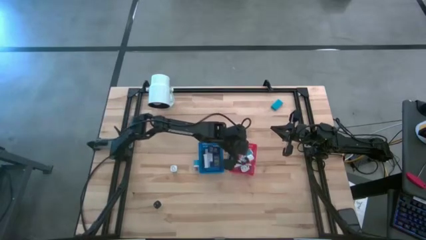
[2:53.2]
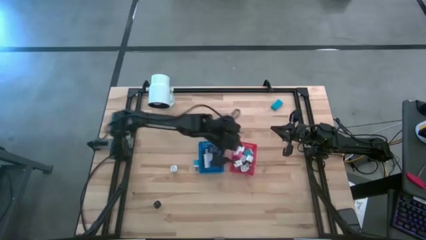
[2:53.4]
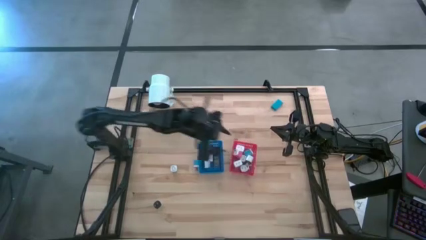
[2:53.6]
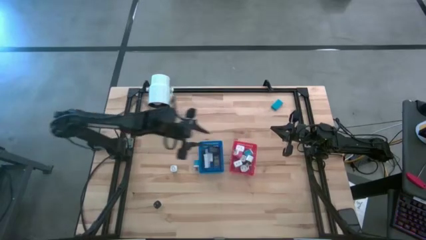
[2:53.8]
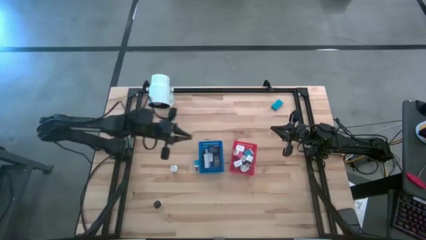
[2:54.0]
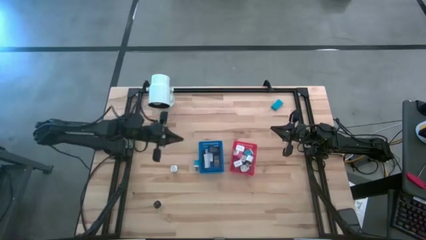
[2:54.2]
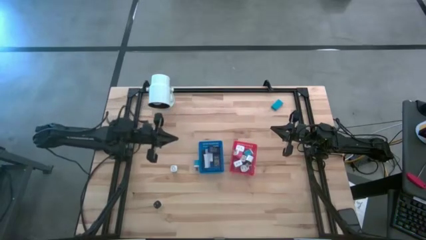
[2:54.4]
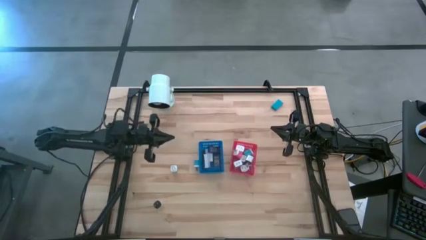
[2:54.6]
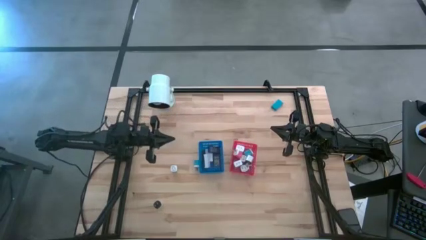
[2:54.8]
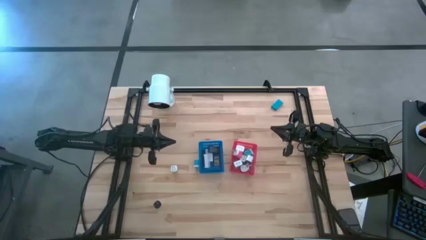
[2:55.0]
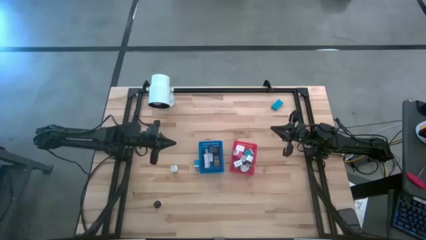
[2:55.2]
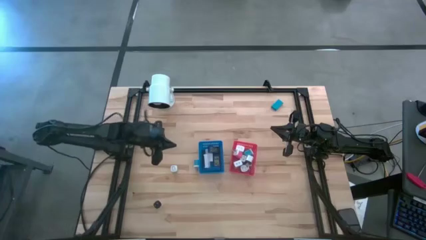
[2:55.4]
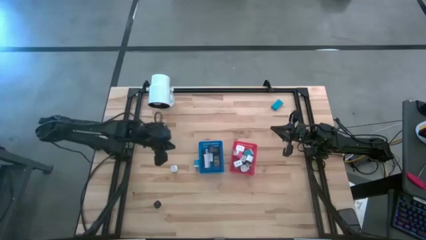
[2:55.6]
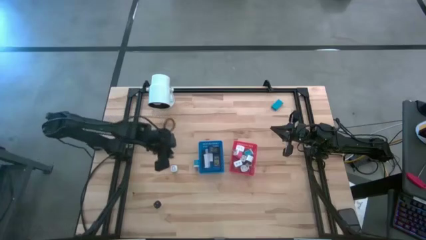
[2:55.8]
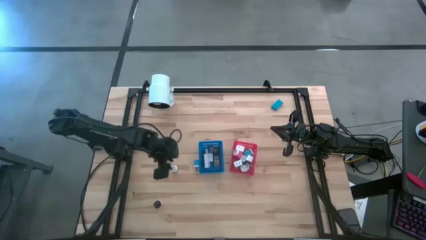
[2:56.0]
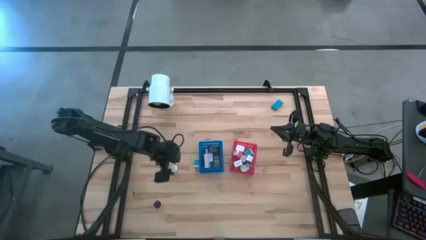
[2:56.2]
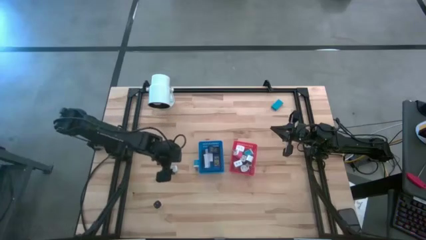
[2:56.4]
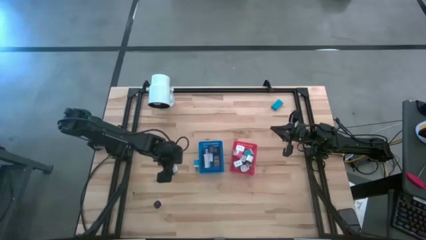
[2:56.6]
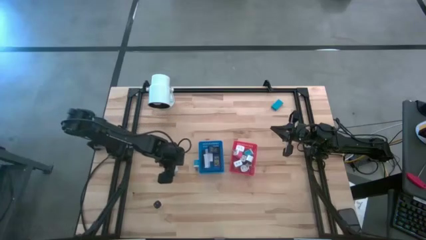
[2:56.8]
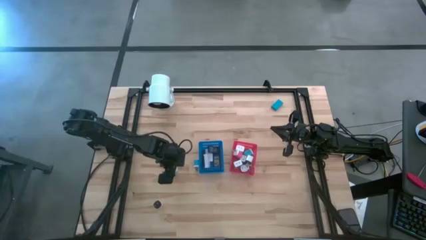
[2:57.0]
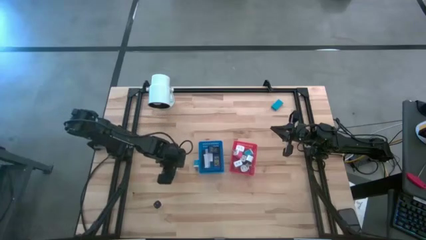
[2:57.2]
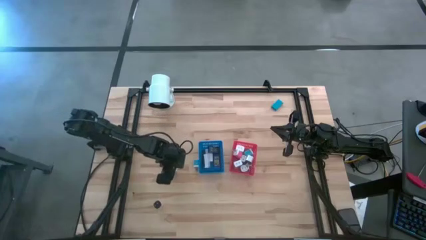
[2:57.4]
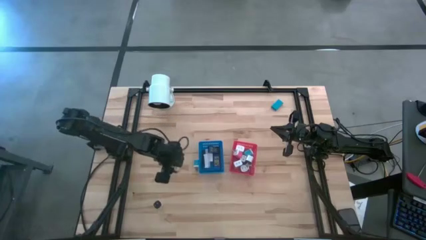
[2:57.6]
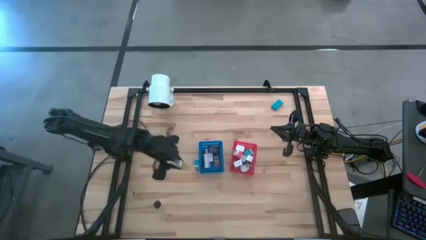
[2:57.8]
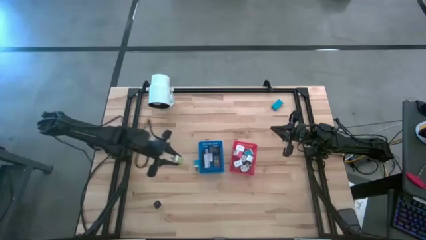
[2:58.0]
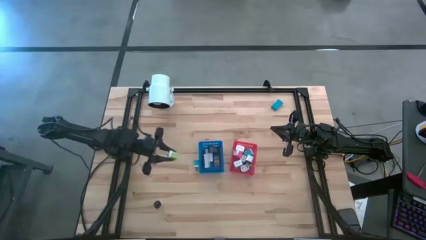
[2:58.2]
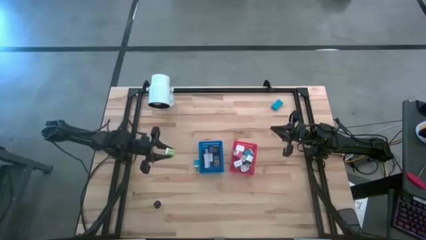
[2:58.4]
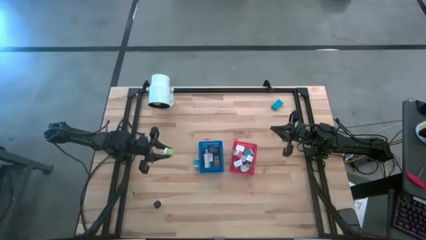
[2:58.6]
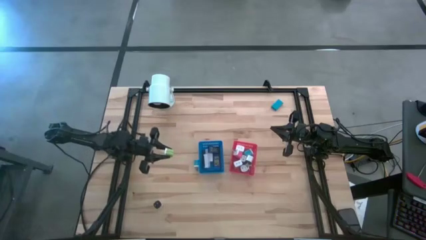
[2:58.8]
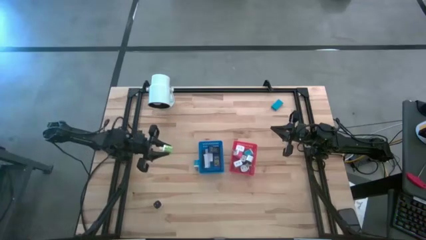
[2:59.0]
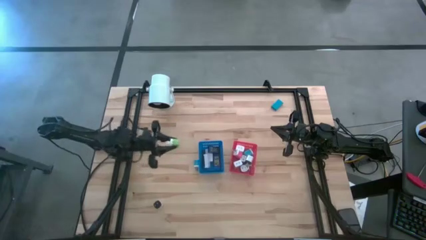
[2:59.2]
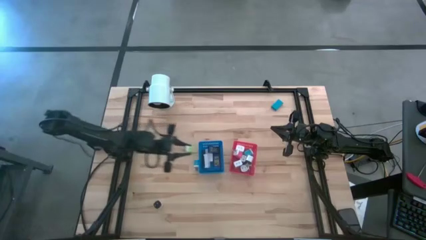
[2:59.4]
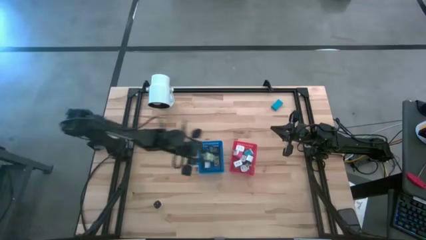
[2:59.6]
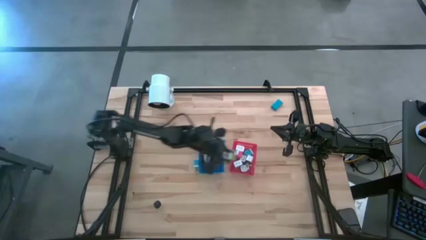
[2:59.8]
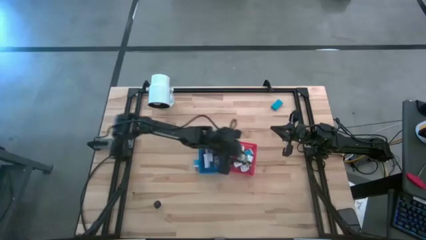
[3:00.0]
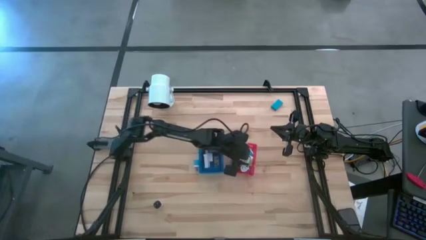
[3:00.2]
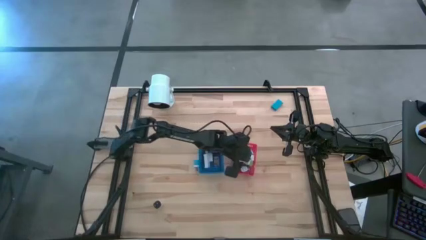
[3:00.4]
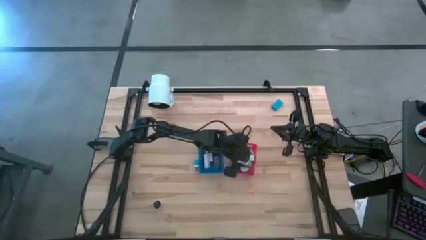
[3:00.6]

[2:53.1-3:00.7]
Task: Sort adapters and digital timers
Put the light green charger adaptor into the red bin

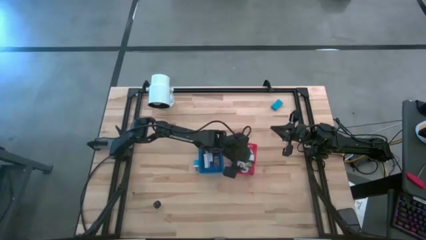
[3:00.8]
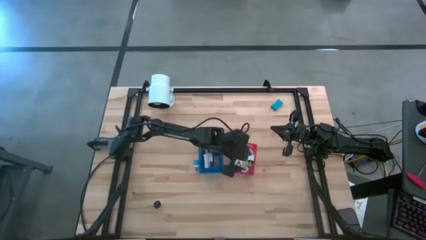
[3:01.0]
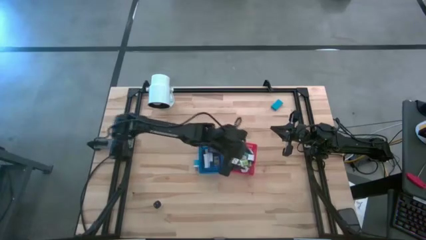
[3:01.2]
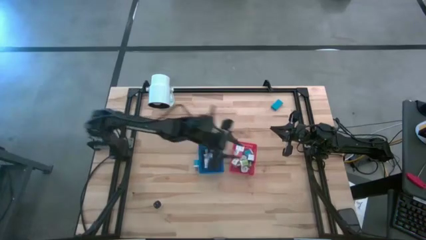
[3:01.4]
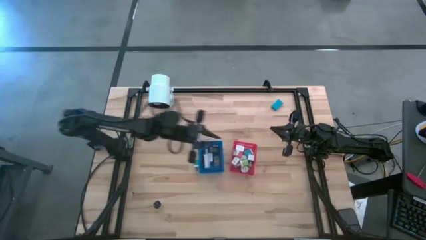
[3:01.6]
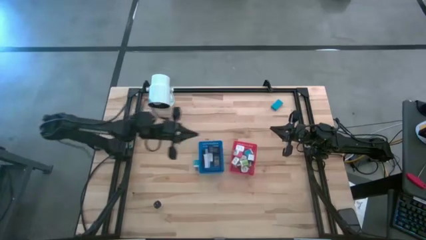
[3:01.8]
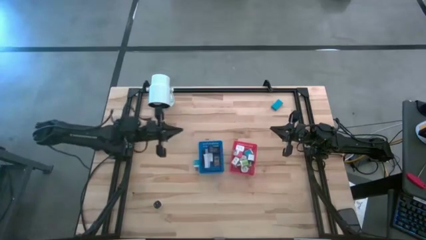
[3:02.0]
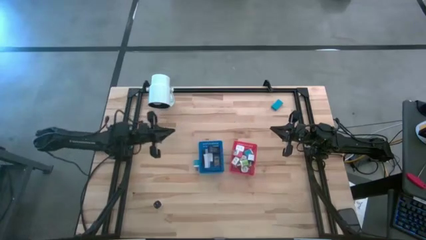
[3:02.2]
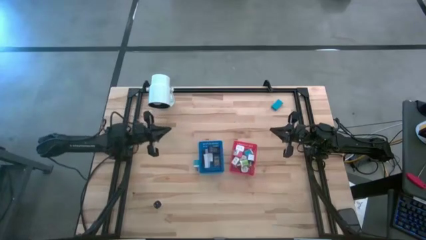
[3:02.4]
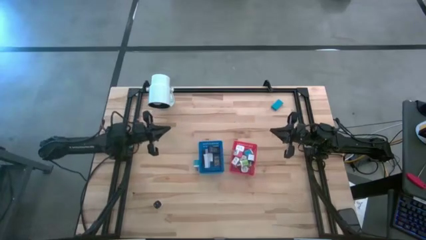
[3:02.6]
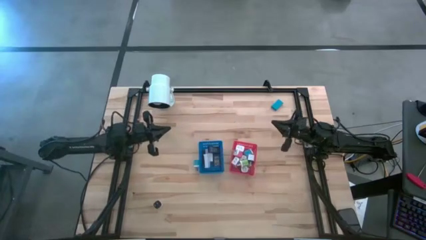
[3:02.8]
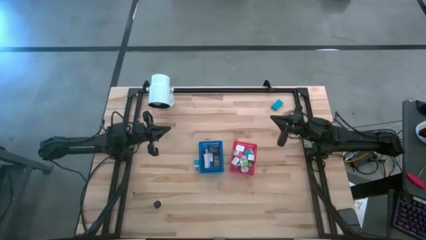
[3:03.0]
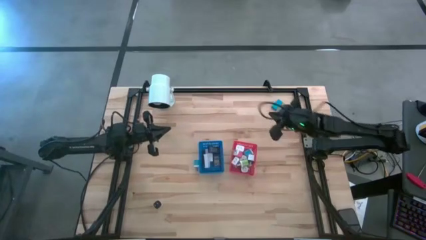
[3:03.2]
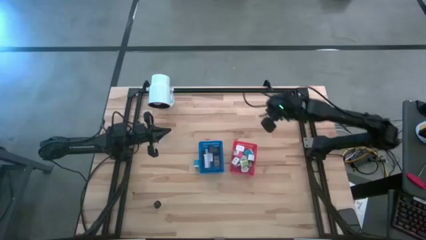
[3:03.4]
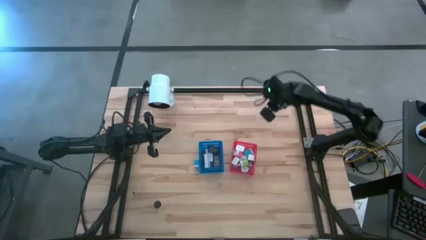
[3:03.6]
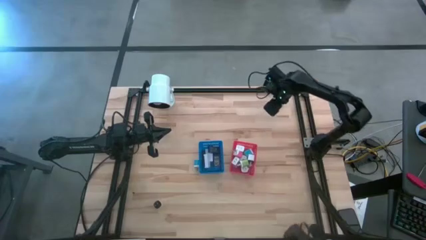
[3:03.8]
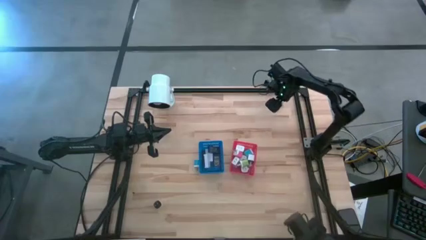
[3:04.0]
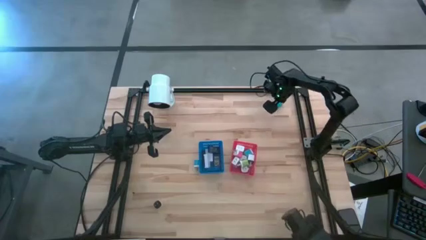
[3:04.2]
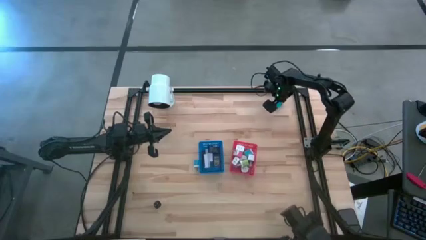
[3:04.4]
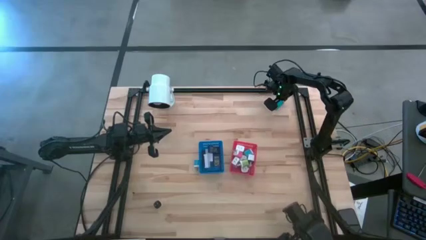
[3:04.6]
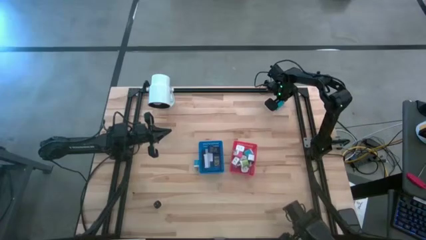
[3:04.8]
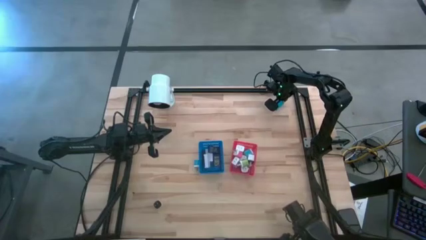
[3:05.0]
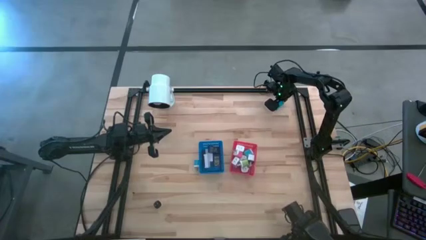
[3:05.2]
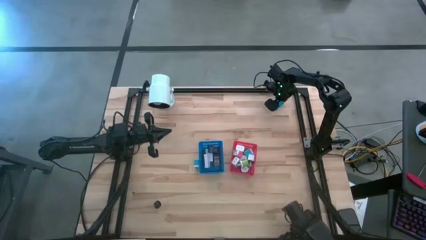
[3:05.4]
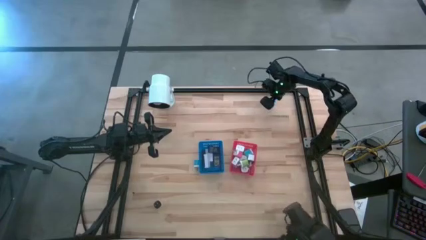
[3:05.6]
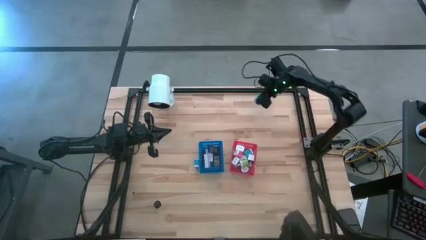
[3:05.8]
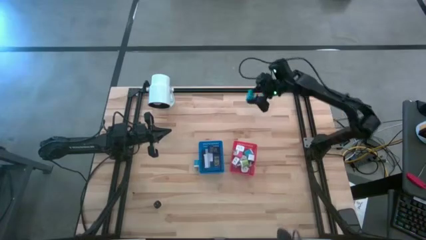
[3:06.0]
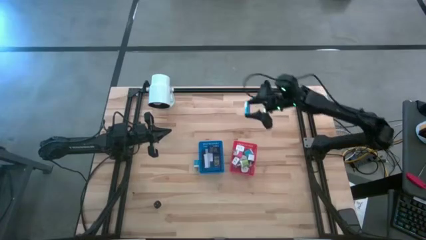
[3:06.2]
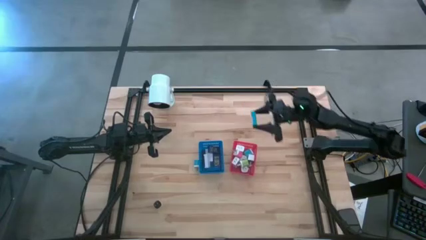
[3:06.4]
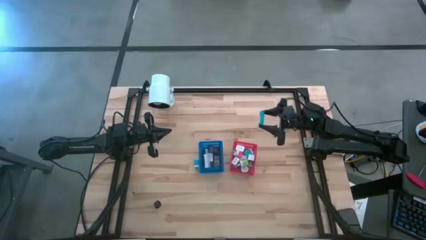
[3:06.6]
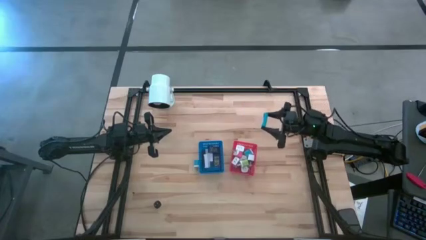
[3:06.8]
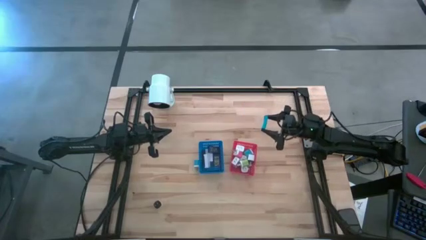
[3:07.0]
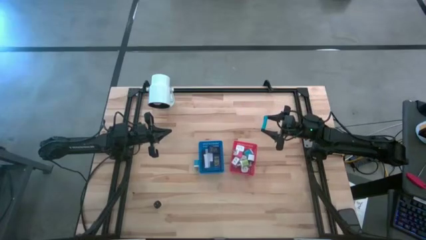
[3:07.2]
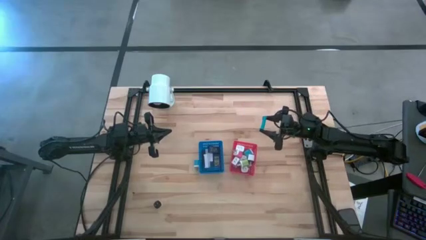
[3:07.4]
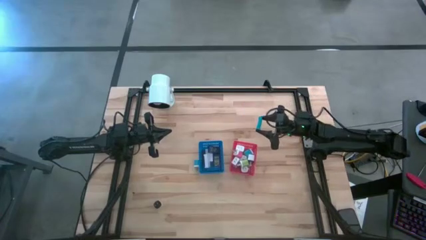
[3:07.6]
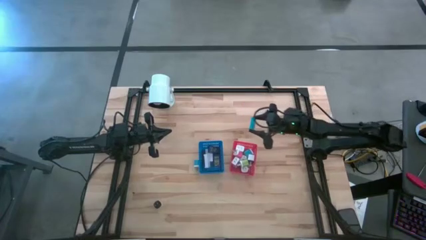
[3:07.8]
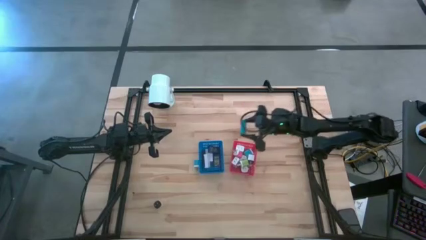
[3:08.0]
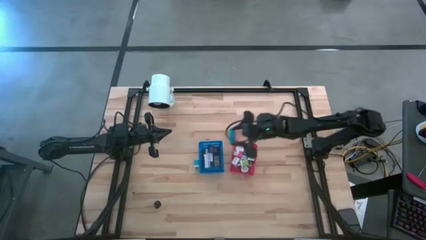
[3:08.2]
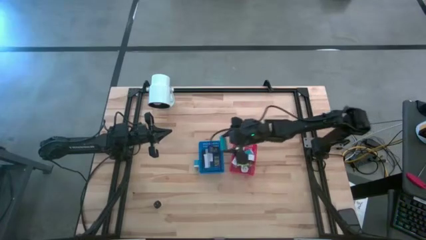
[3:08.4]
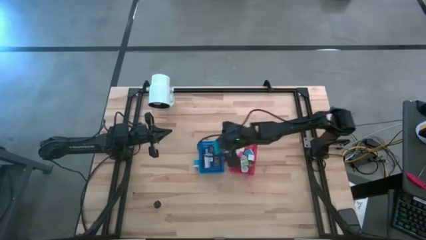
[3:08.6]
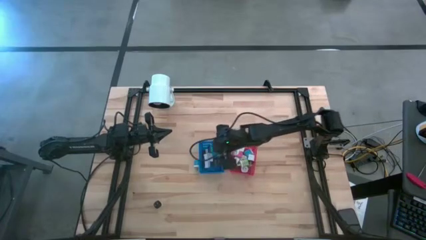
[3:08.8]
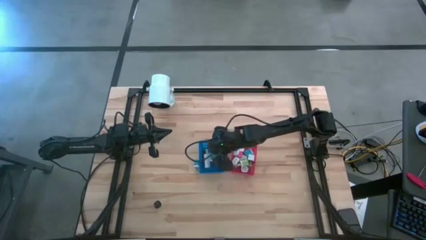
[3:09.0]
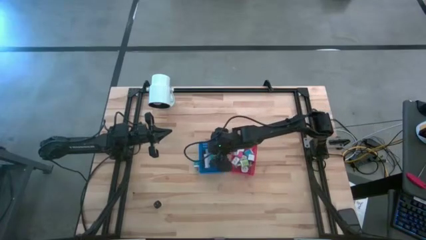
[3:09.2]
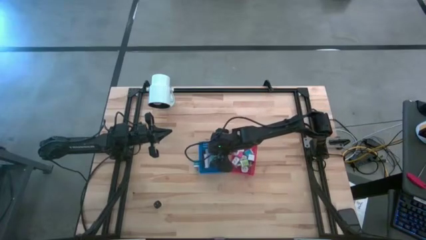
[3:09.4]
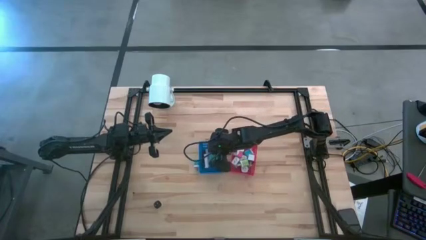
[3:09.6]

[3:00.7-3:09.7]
Put the blue timer into the blue bin
